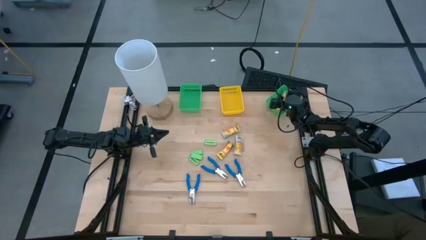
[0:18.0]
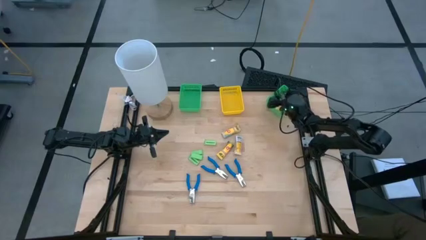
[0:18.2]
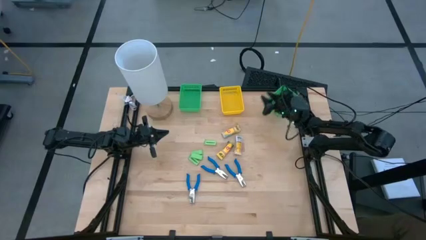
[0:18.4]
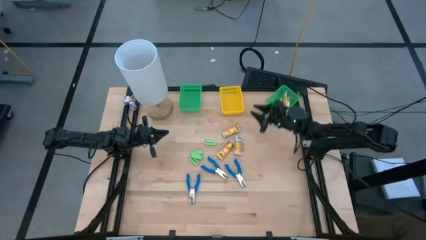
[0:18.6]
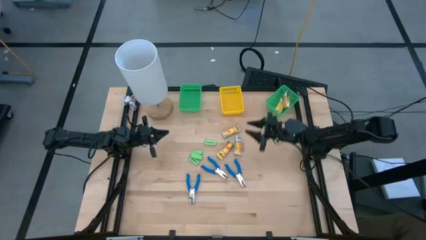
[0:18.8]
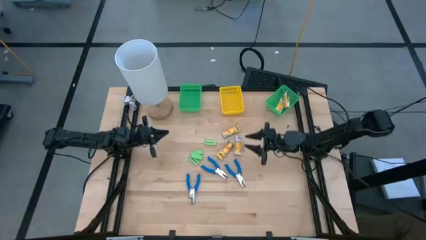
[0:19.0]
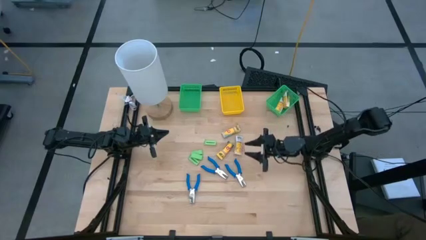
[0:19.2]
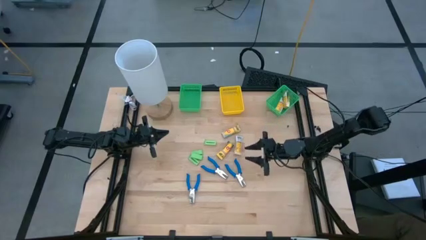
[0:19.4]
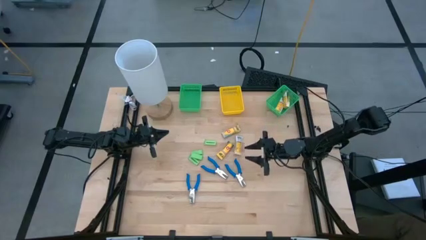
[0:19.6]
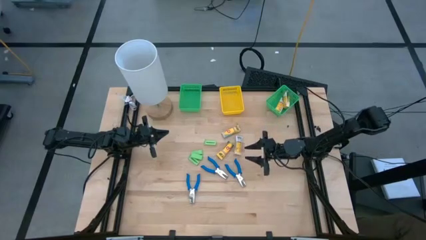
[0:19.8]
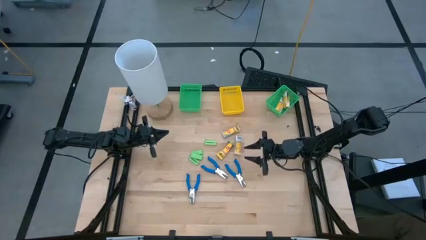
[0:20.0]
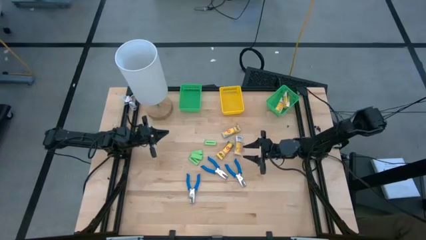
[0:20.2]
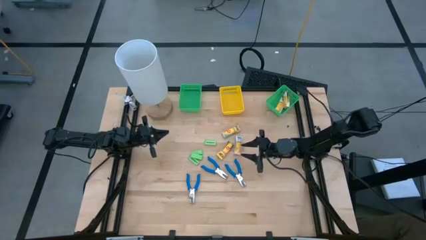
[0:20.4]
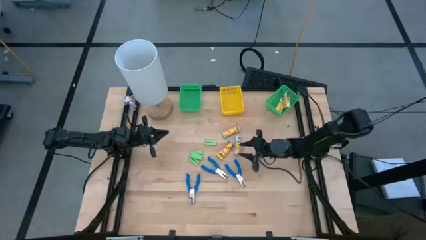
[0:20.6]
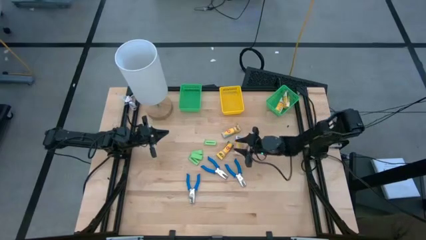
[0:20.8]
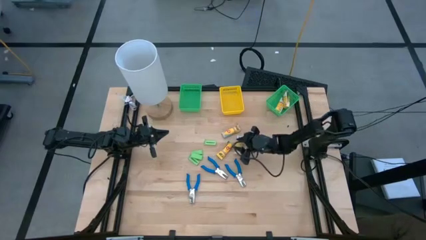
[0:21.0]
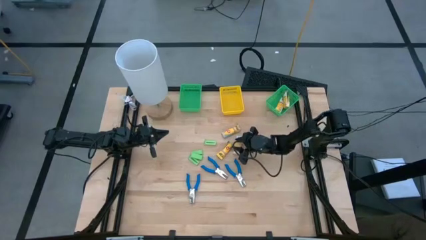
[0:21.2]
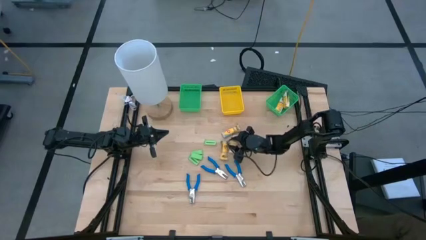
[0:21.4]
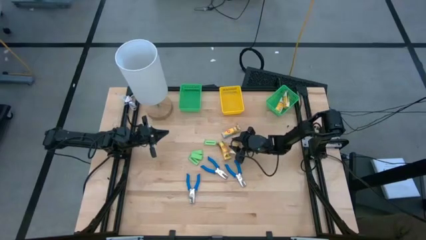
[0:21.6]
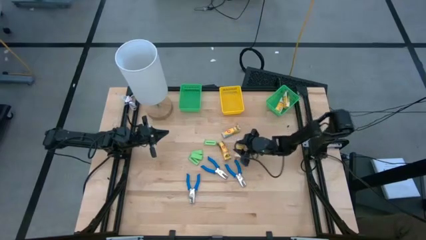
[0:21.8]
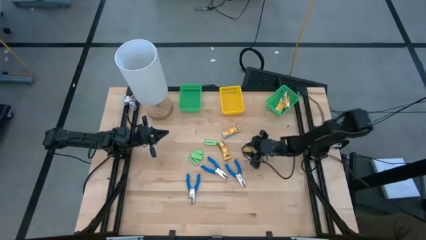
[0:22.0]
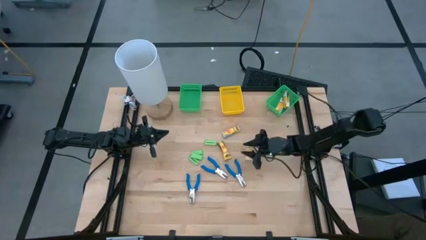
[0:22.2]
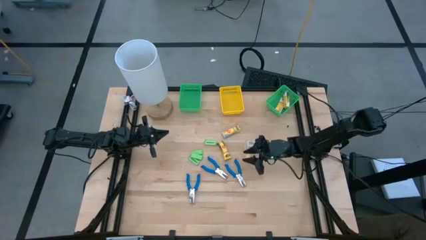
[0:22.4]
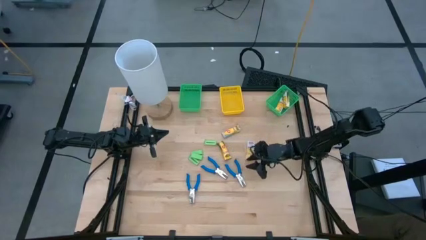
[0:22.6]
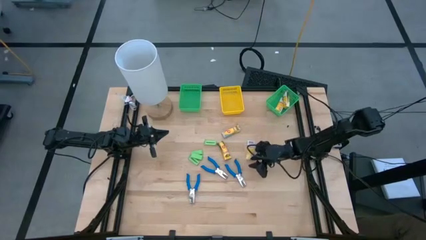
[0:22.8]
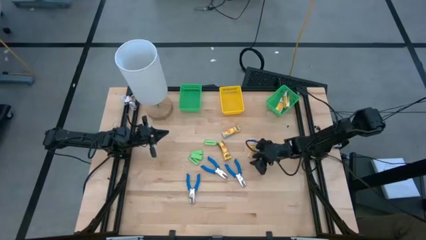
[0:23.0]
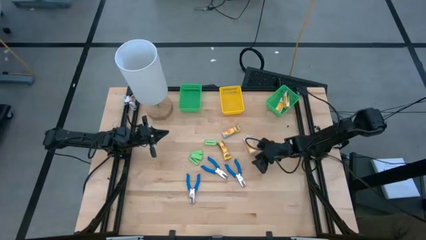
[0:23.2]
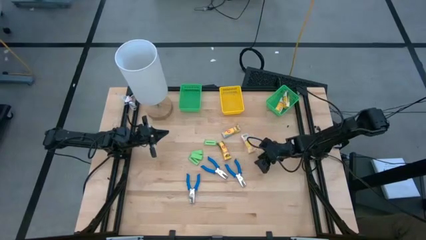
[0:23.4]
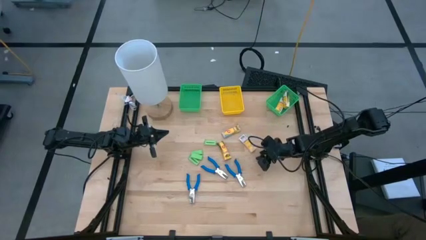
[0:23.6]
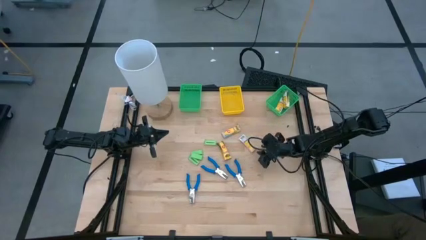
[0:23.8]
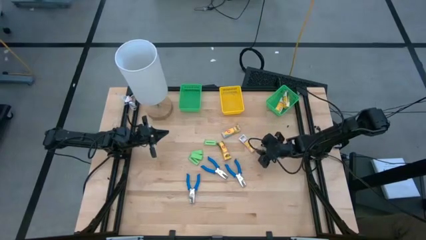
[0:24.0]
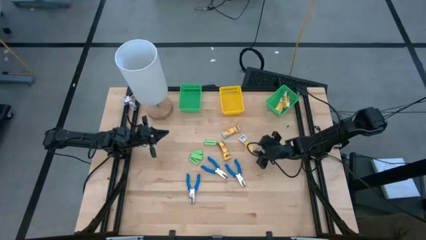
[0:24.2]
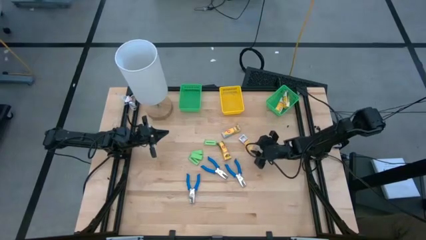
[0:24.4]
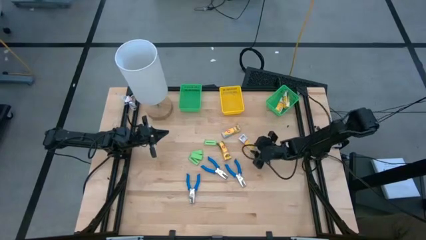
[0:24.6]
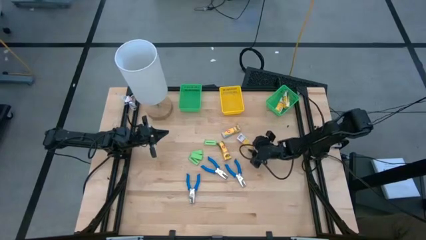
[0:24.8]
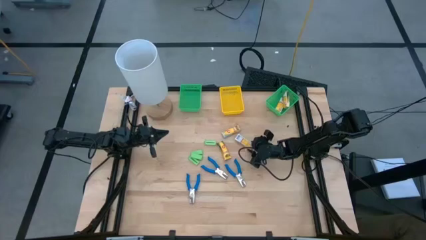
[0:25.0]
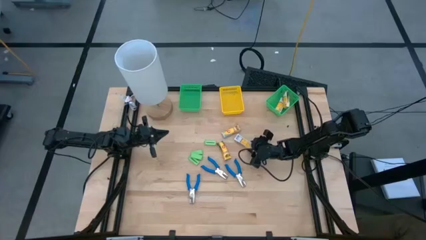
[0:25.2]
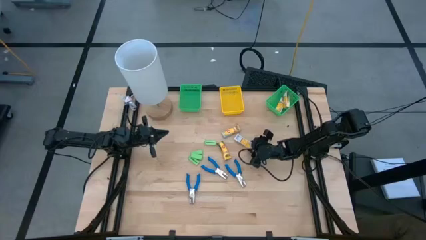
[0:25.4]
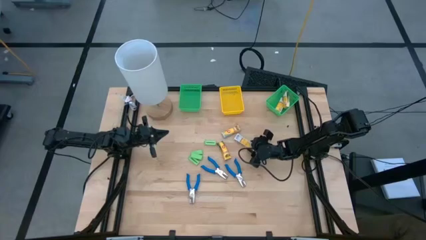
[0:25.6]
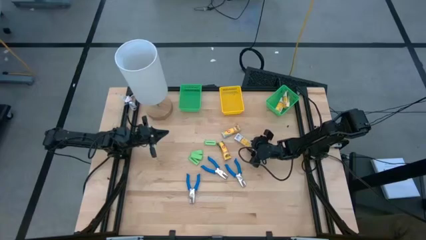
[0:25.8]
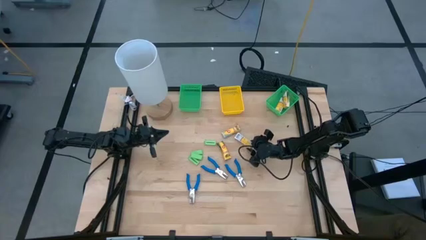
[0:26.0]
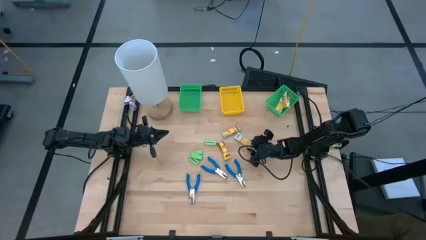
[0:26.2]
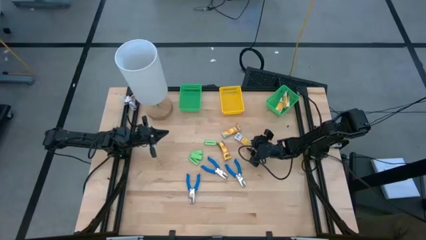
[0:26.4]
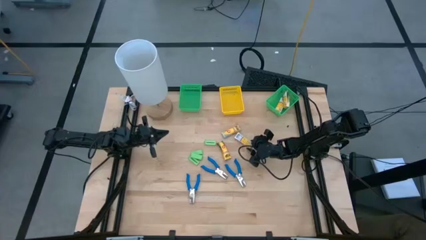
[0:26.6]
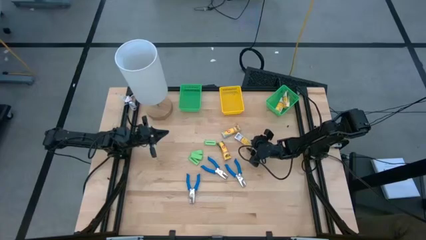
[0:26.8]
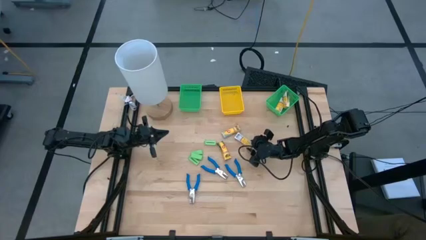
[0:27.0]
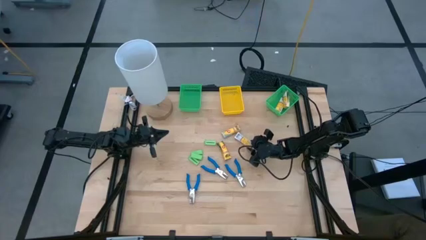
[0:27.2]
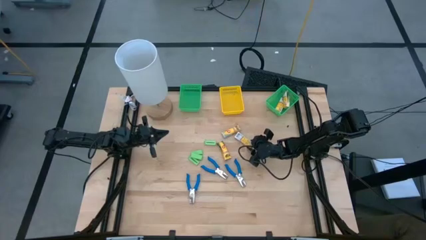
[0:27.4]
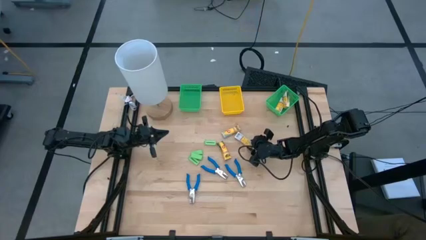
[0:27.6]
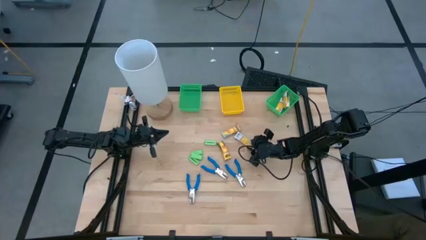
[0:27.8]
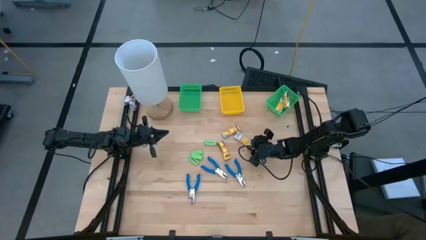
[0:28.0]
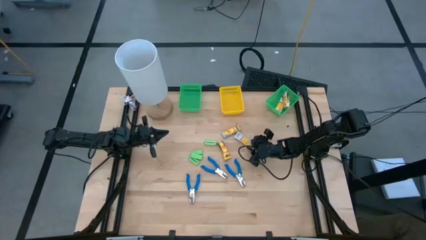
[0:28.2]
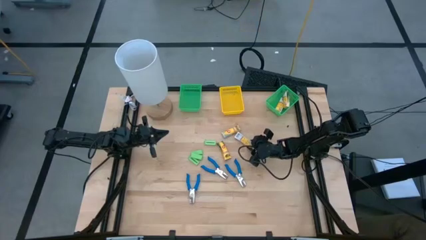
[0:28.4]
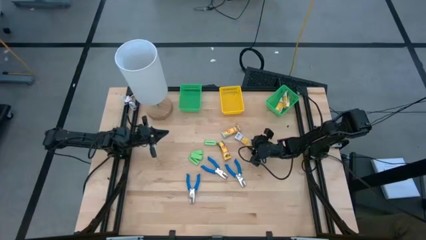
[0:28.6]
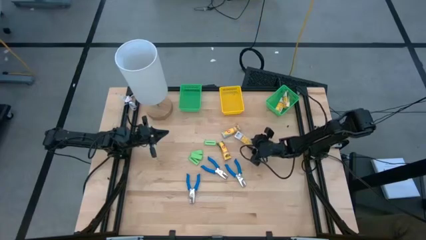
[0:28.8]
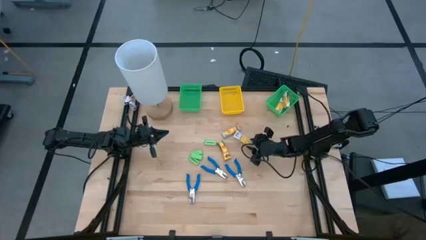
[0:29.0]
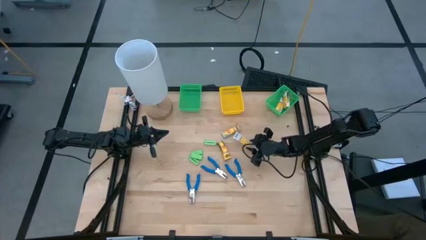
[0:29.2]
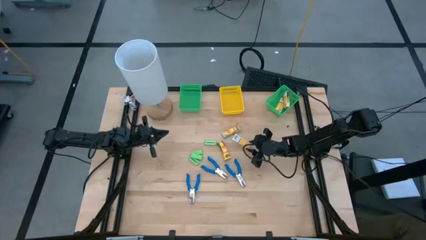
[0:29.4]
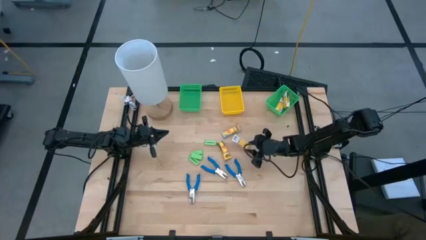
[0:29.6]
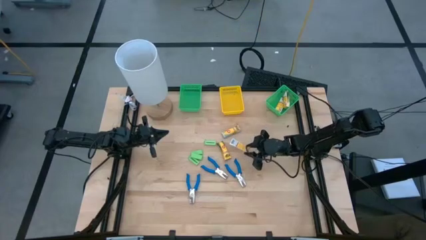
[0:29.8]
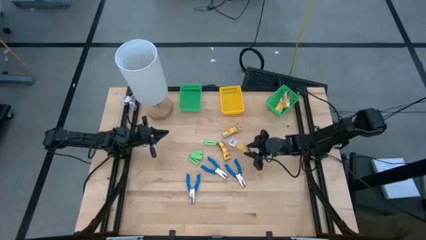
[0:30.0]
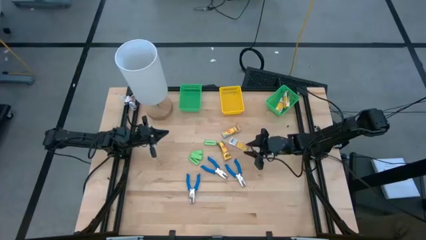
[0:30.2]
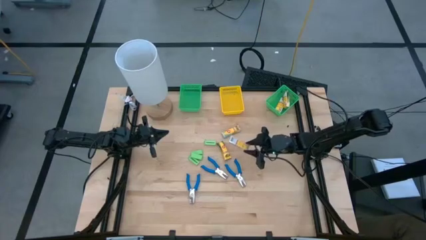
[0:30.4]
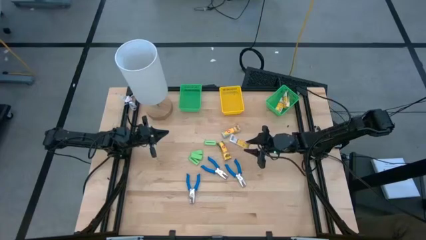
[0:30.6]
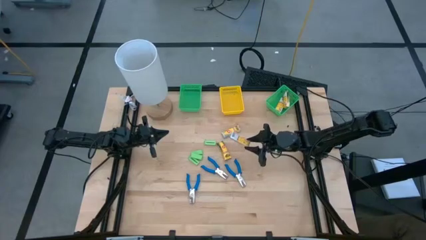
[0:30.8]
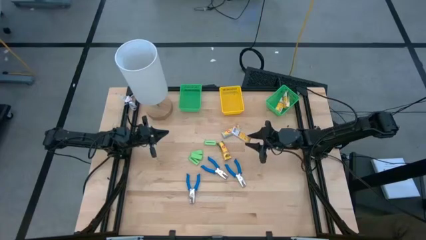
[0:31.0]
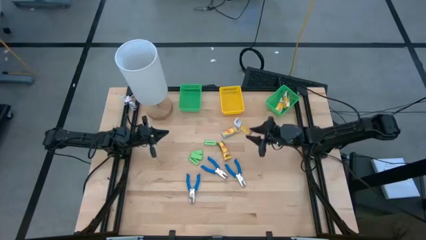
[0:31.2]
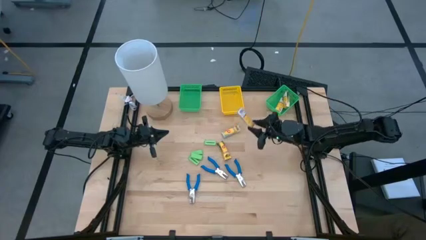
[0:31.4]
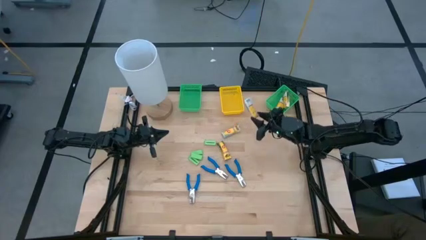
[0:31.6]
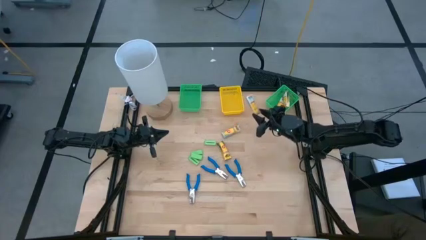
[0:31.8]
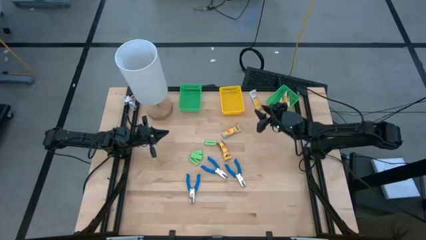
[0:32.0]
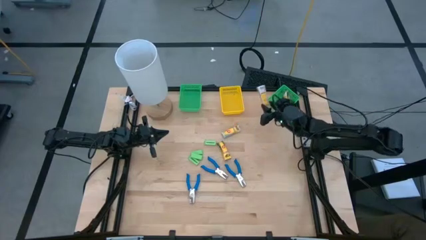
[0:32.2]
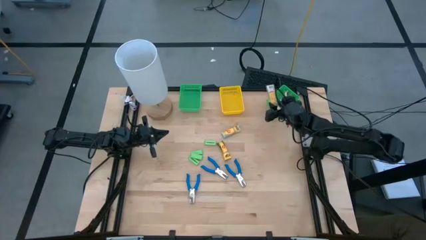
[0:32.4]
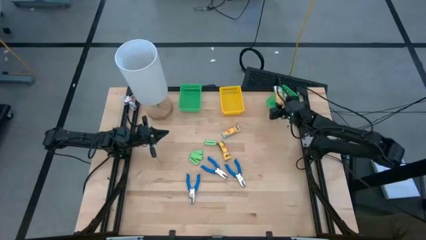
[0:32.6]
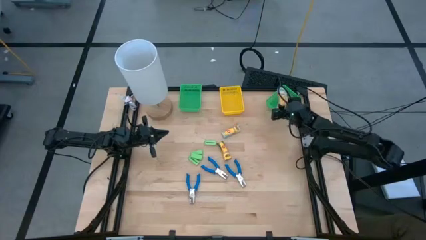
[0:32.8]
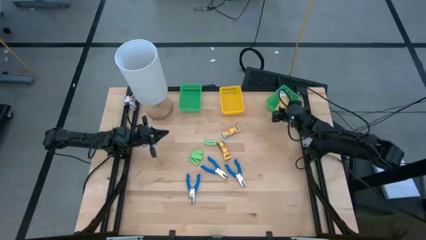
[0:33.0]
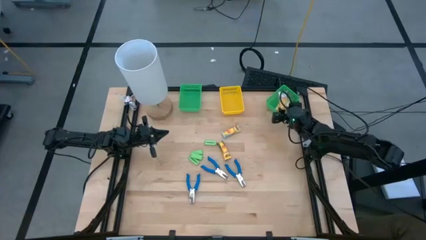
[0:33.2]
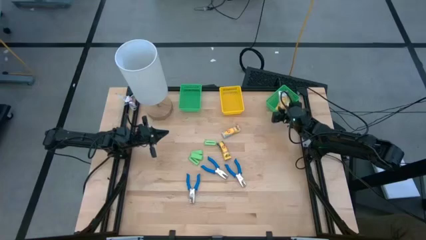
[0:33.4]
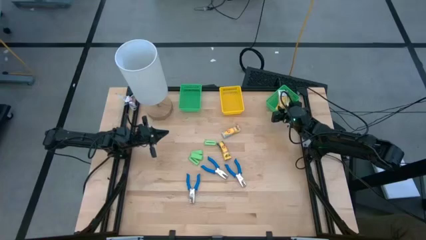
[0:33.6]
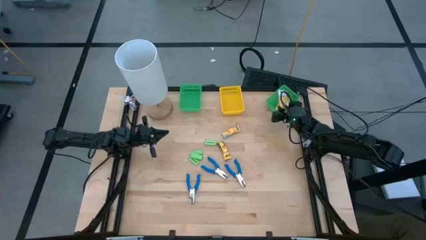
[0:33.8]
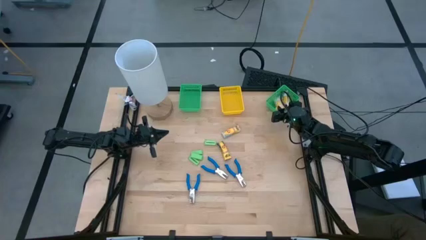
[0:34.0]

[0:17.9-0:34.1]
Task: Pick & Place School Supplies
Put the yellow crayon box into the right green bin
